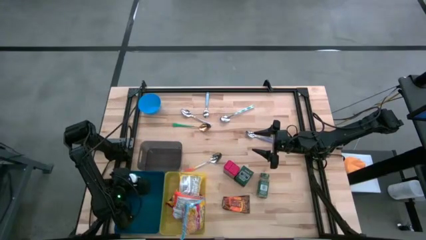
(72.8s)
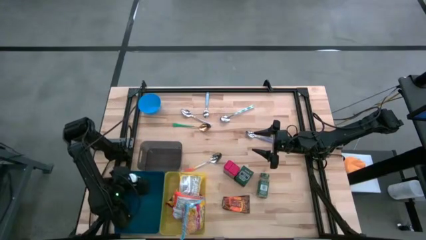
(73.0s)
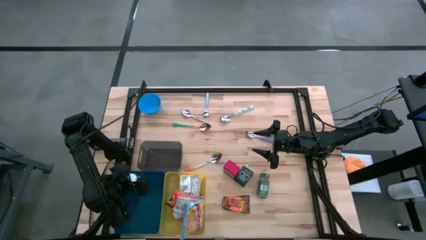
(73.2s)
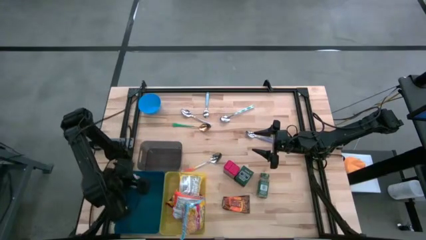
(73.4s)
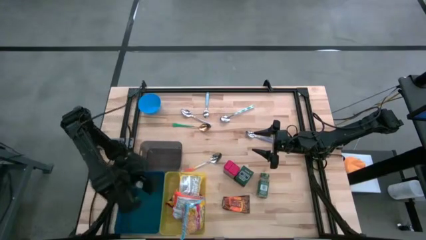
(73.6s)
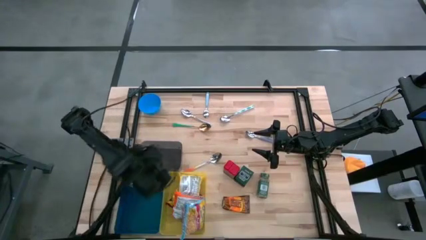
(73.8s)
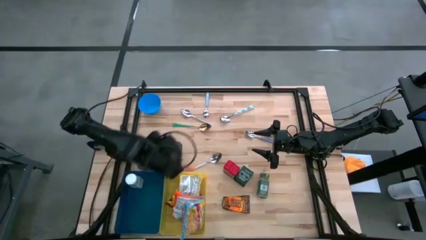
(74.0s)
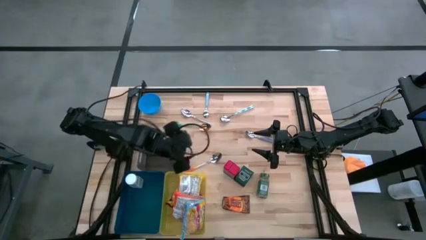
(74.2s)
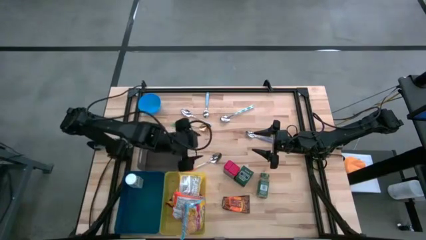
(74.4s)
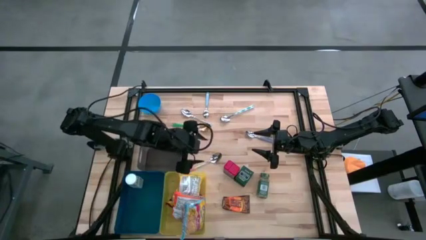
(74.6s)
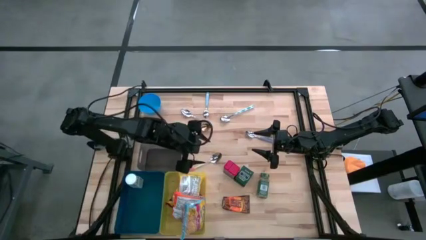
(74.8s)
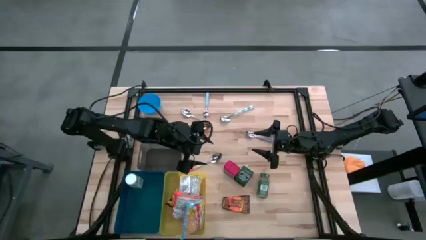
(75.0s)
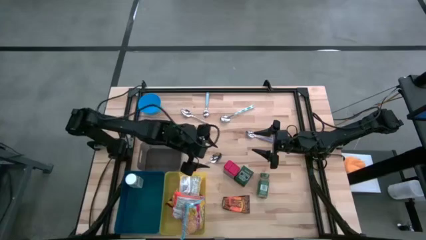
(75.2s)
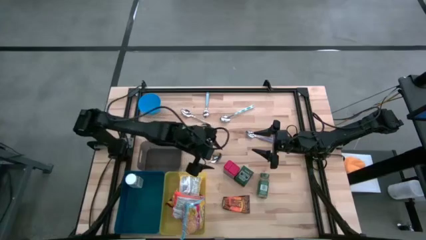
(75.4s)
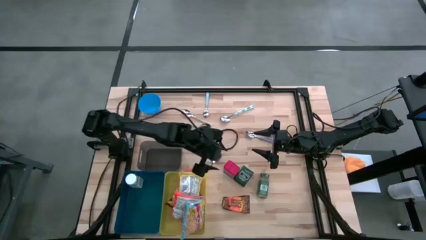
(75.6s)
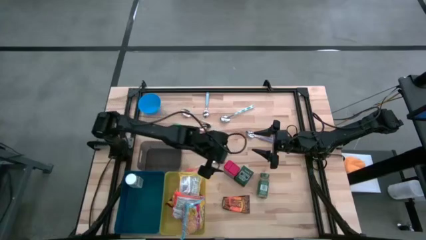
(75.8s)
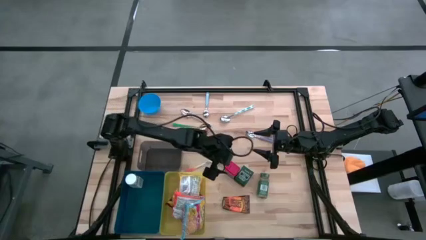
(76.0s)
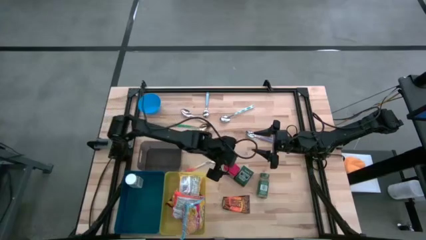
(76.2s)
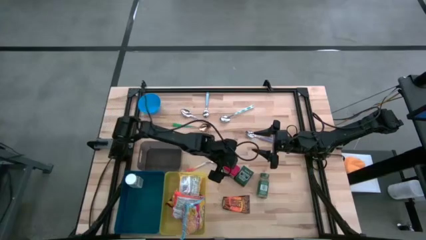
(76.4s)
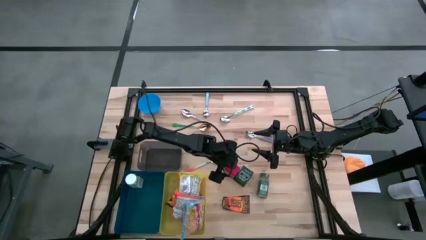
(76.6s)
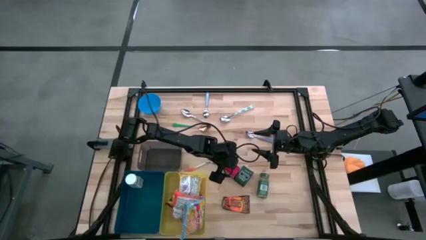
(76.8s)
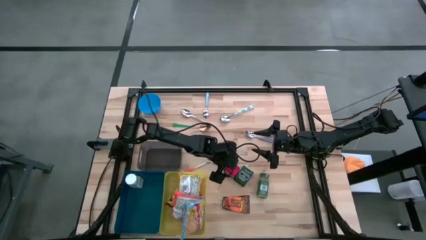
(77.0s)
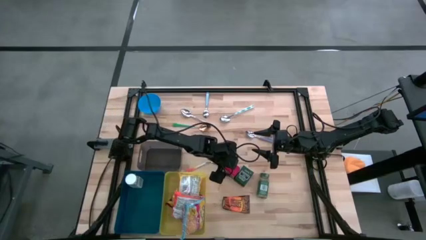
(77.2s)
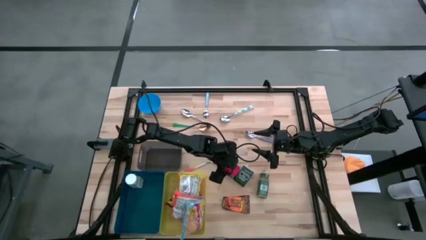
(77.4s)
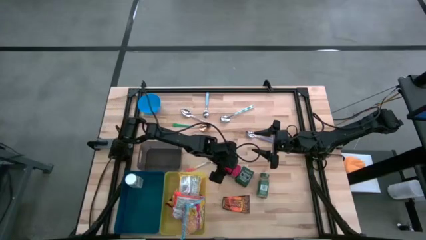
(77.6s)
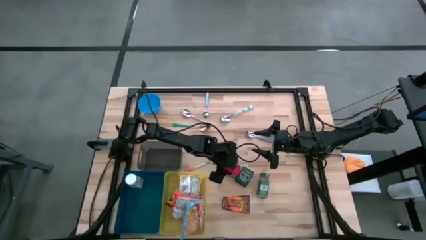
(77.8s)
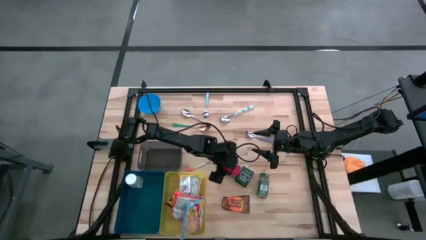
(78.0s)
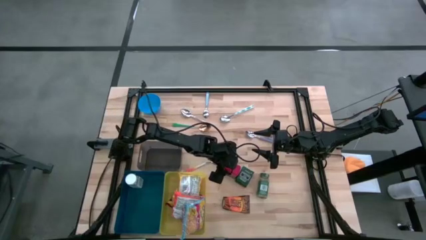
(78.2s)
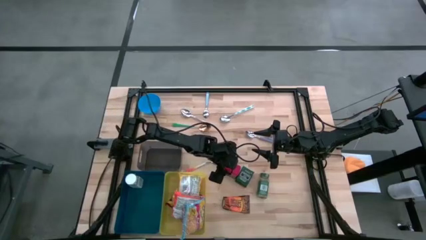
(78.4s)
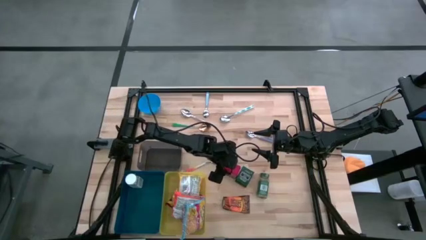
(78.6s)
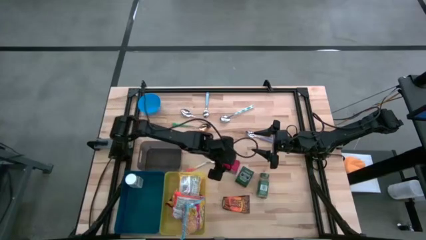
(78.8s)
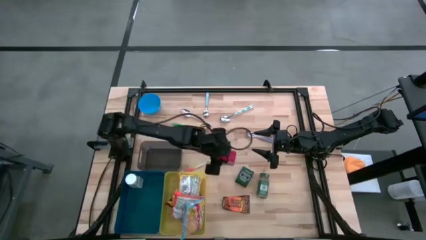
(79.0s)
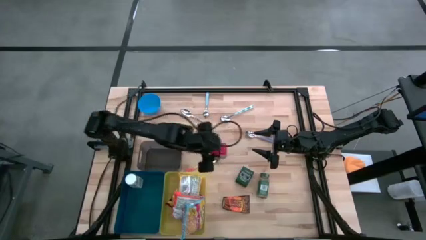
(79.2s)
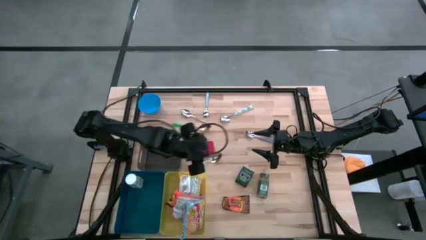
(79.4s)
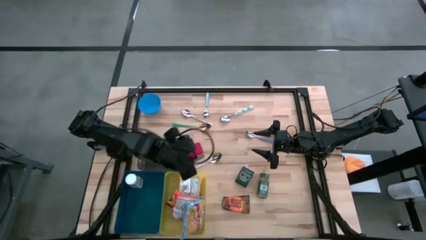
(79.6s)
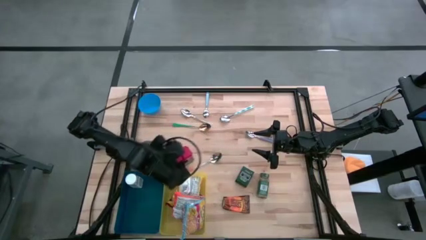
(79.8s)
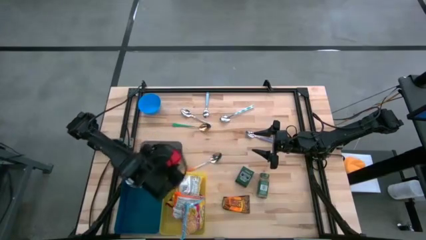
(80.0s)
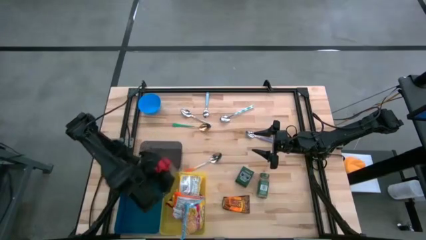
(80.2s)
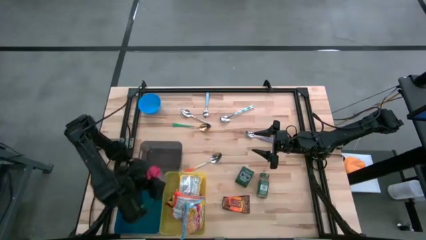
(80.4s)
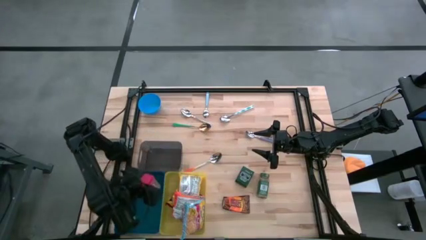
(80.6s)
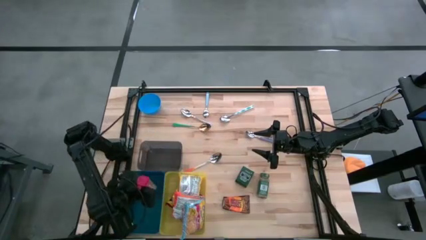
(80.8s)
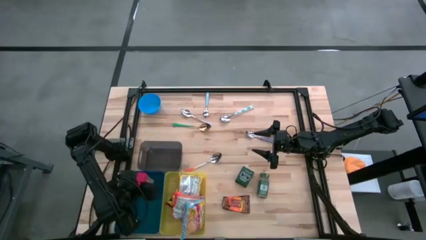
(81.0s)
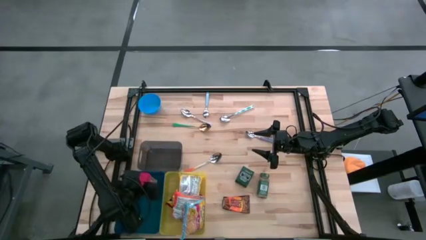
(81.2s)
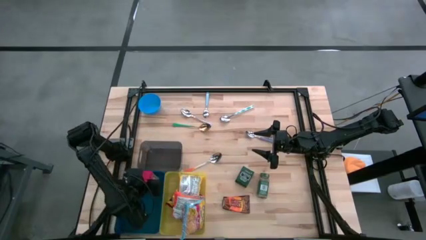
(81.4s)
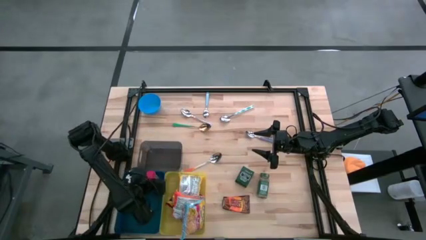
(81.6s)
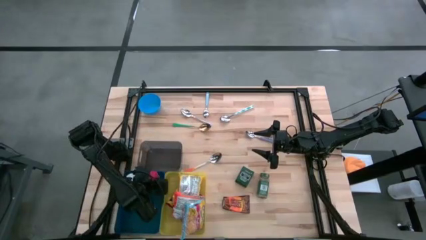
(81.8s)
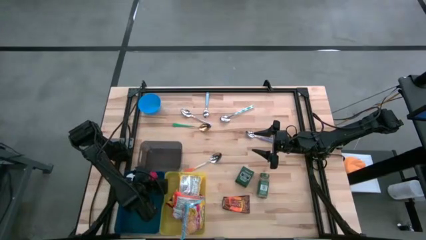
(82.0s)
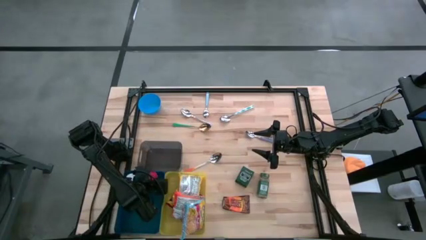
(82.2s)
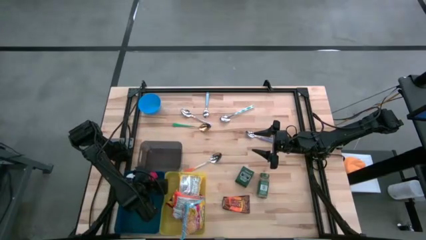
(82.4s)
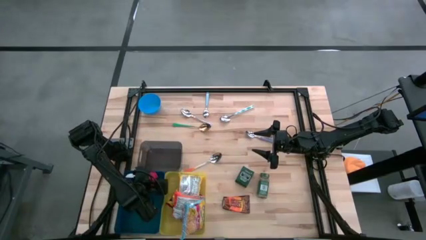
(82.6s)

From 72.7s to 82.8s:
Put the red seasoning can into the blue bin

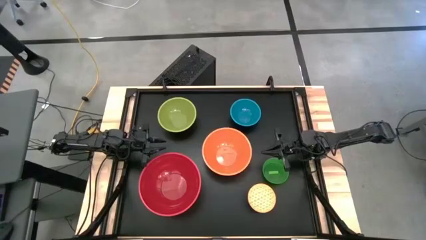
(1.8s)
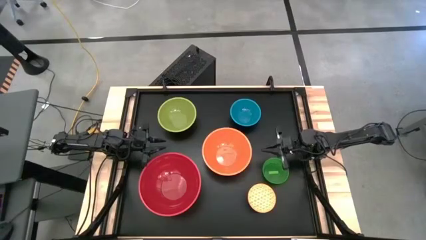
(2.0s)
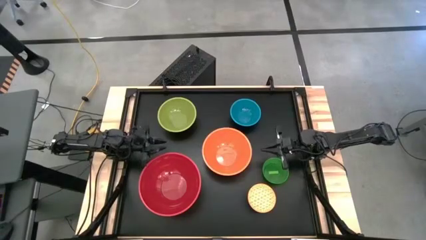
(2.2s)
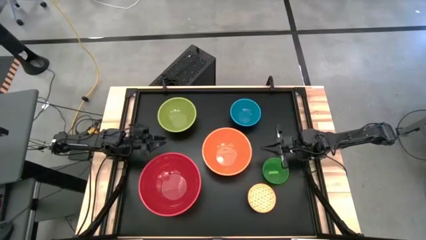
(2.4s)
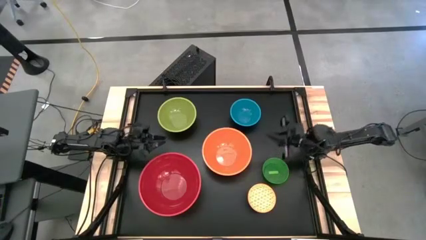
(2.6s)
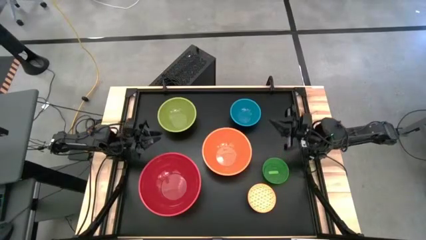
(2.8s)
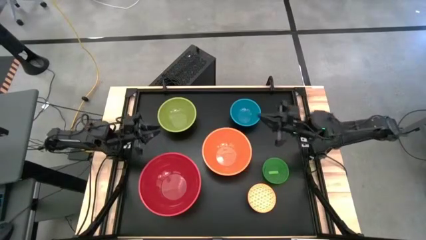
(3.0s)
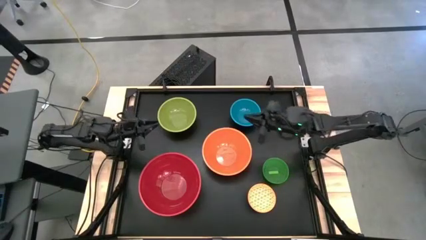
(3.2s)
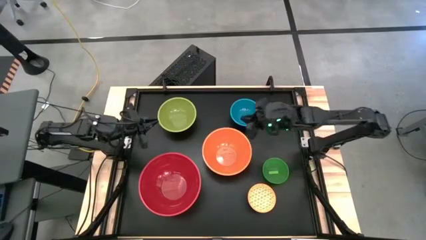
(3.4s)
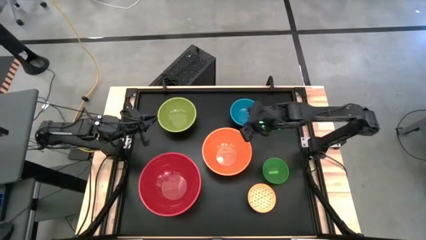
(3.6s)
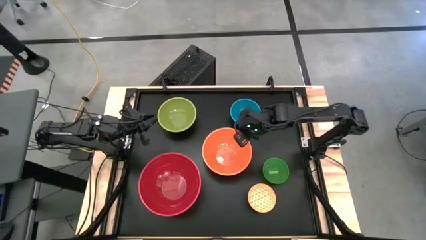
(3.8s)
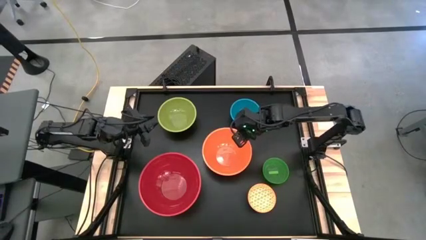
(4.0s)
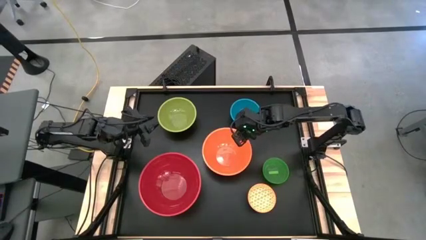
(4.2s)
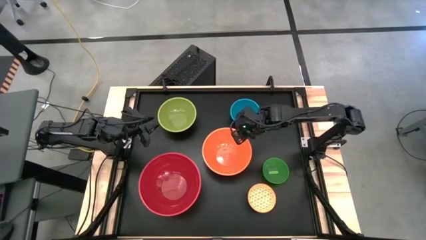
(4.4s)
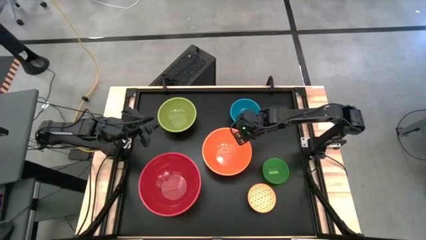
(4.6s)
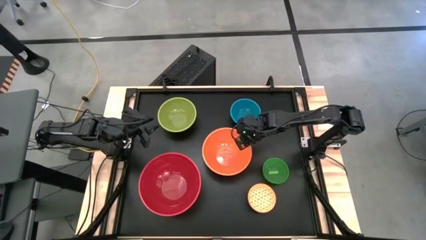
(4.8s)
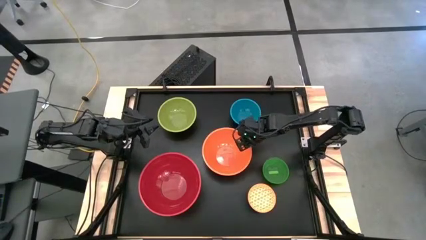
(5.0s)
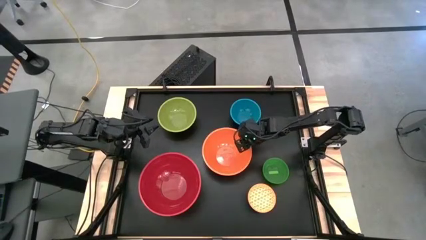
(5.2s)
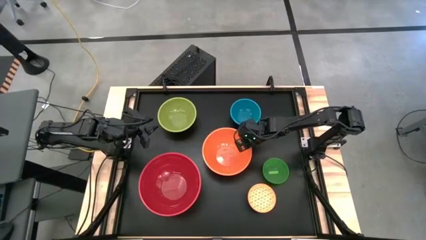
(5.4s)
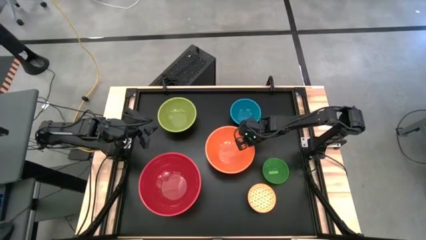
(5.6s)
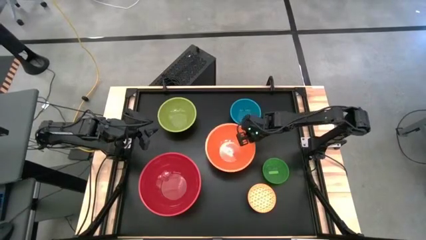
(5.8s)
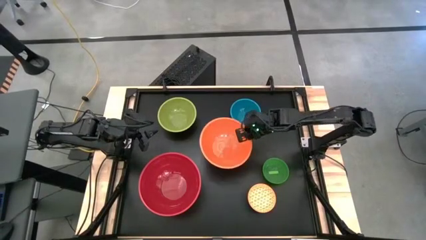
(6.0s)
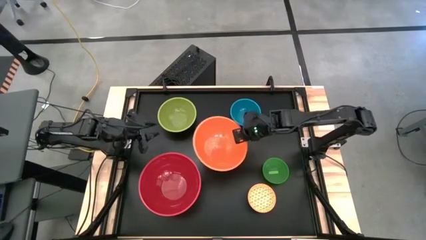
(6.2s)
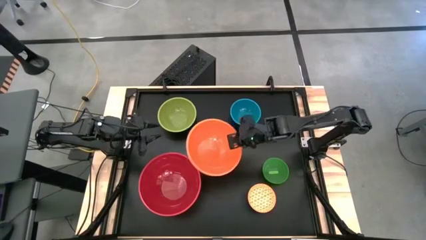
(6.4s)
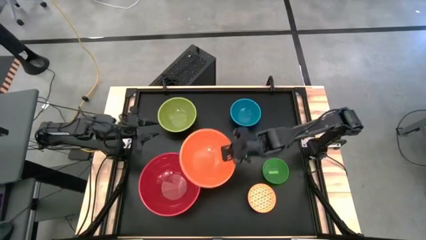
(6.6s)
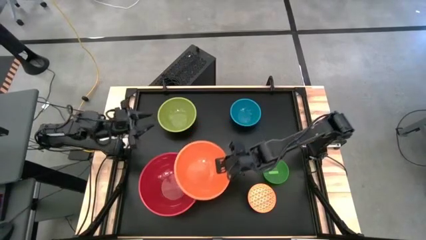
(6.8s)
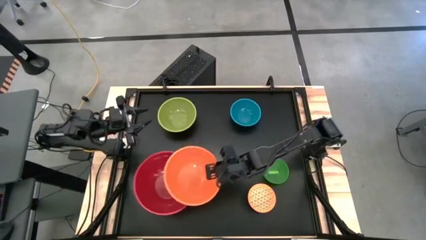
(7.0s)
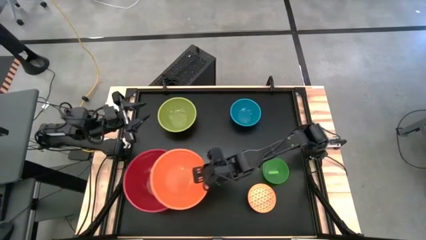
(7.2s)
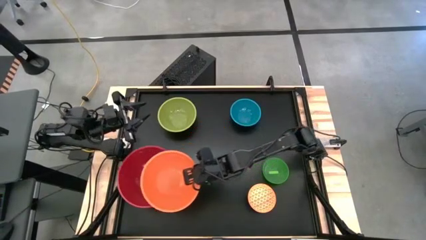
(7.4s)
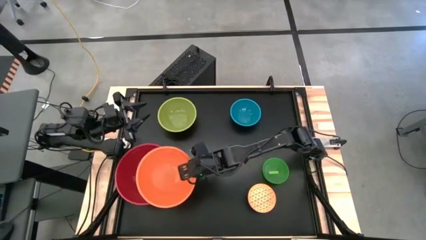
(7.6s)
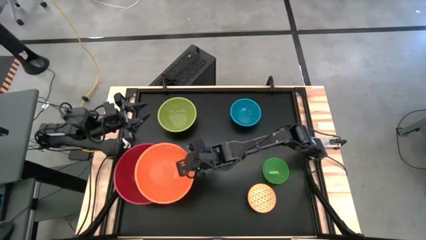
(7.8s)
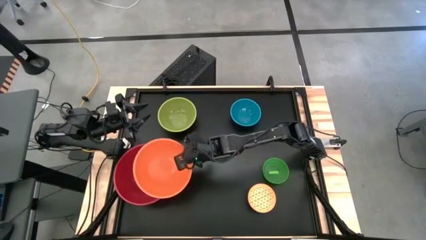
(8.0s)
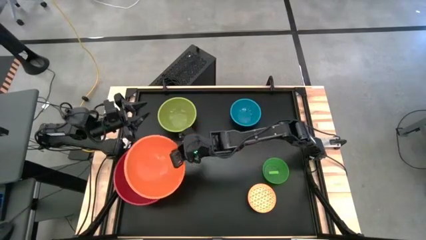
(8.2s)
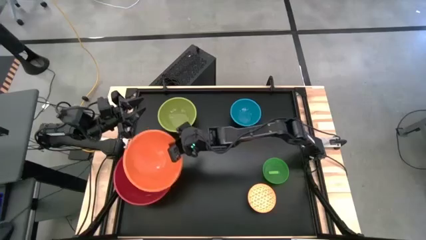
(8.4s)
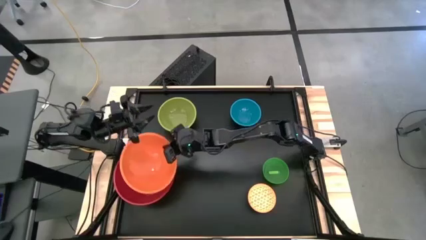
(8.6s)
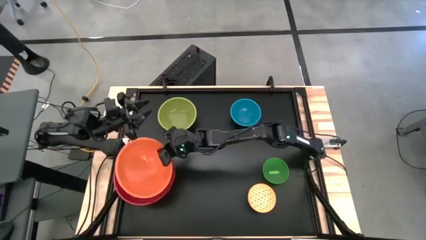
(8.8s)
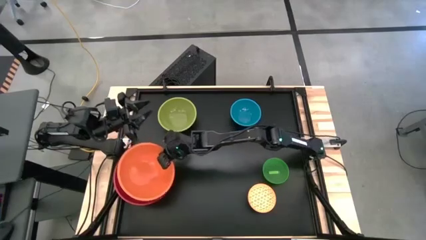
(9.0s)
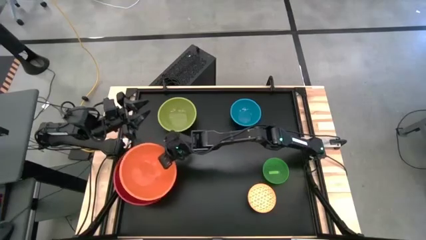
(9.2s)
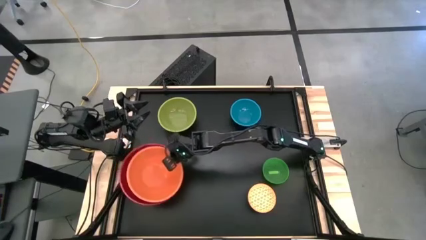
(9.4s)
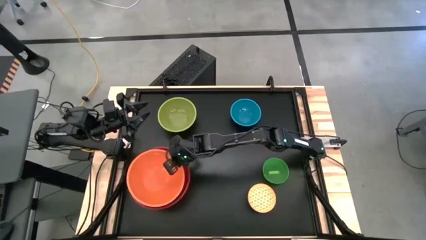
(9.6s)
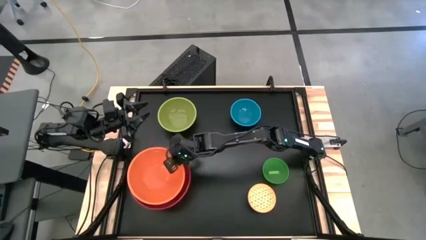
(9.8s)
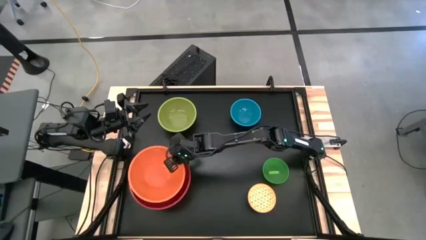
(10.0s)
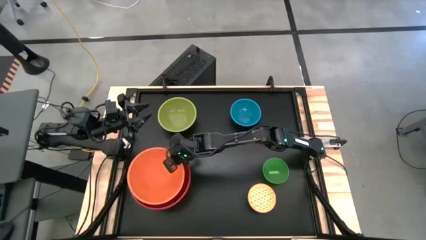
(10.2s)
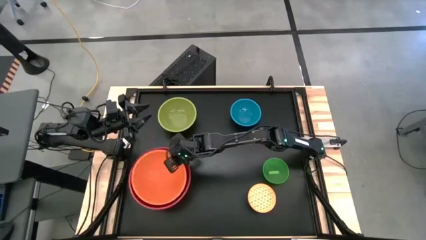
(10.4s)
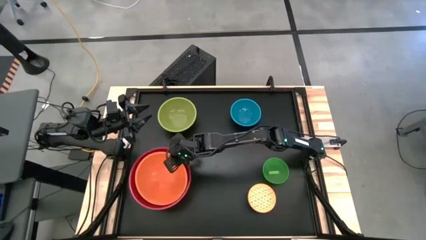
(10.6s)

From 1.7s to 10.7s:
Stack the orange bowl into the red bowl
